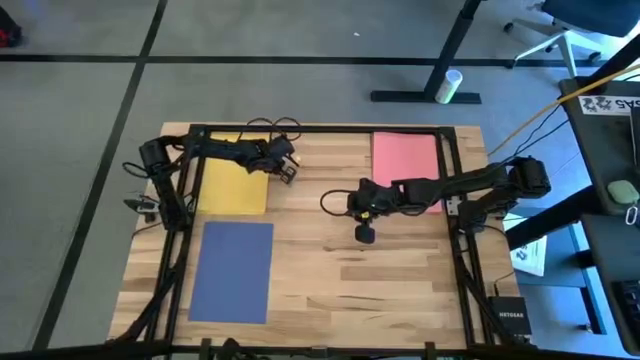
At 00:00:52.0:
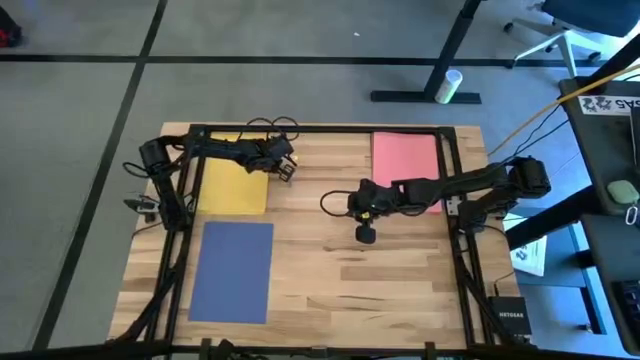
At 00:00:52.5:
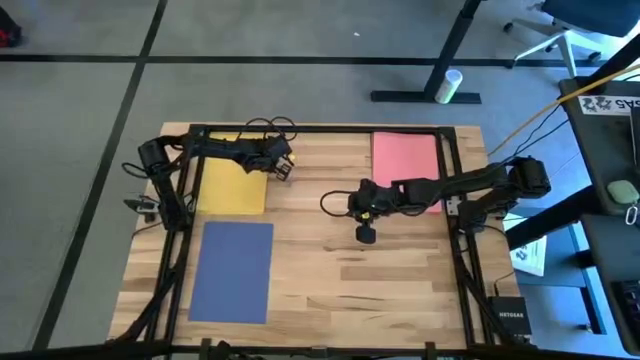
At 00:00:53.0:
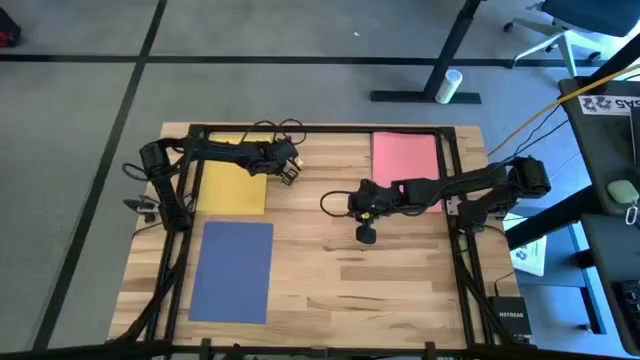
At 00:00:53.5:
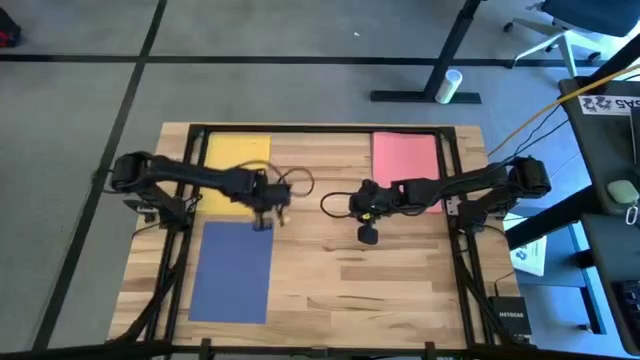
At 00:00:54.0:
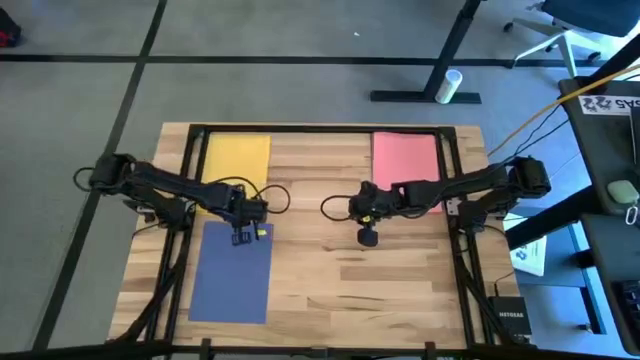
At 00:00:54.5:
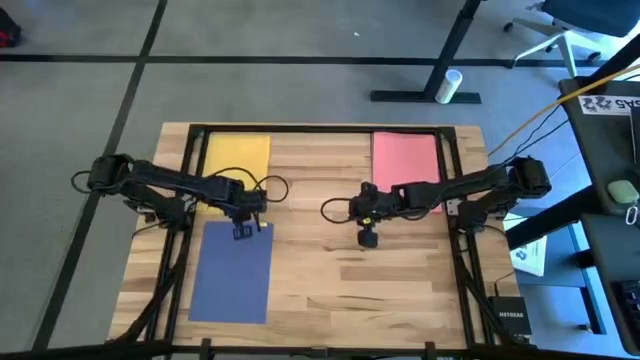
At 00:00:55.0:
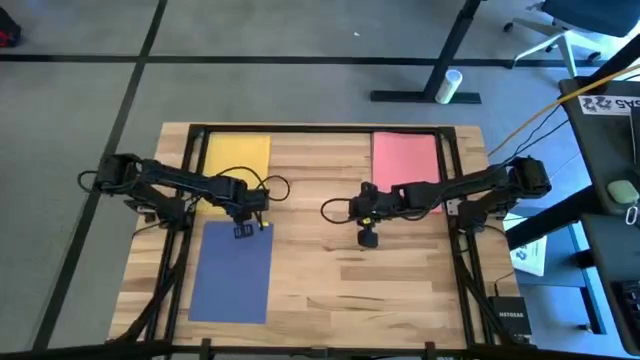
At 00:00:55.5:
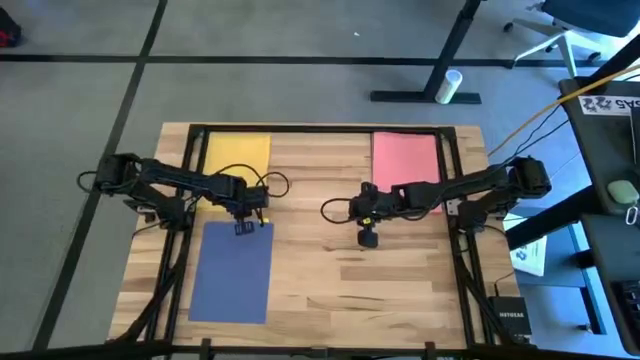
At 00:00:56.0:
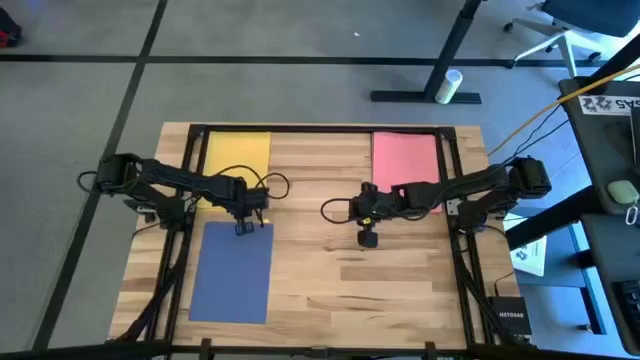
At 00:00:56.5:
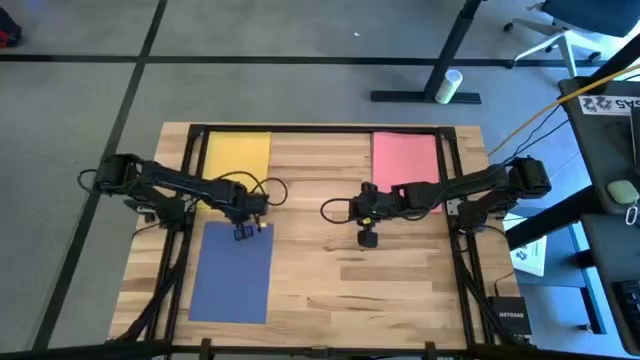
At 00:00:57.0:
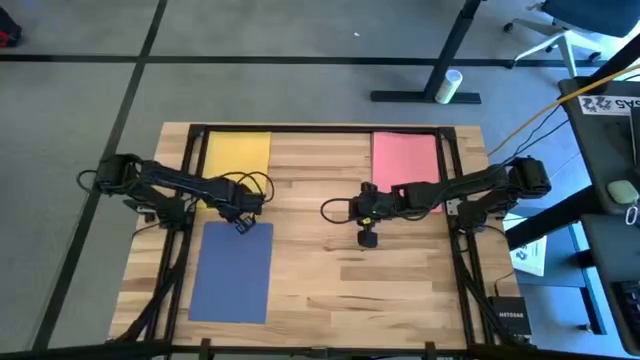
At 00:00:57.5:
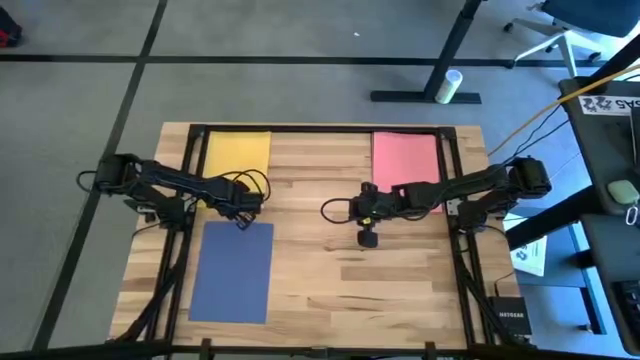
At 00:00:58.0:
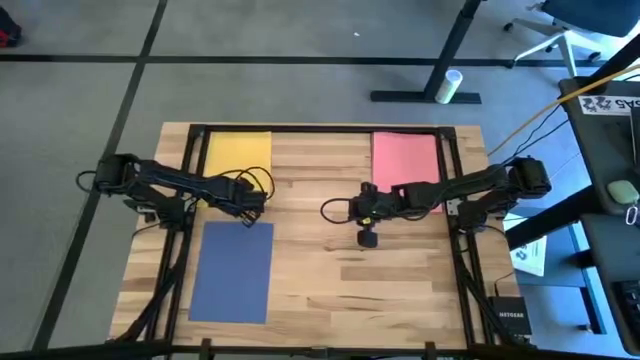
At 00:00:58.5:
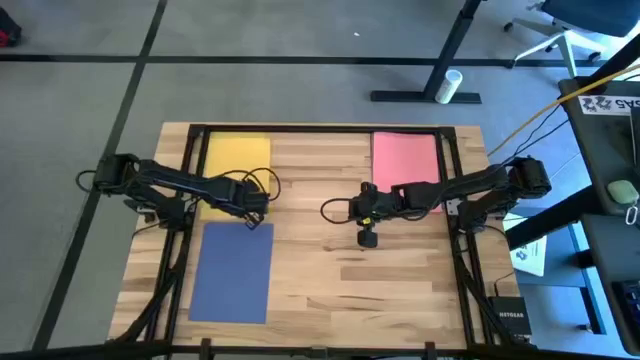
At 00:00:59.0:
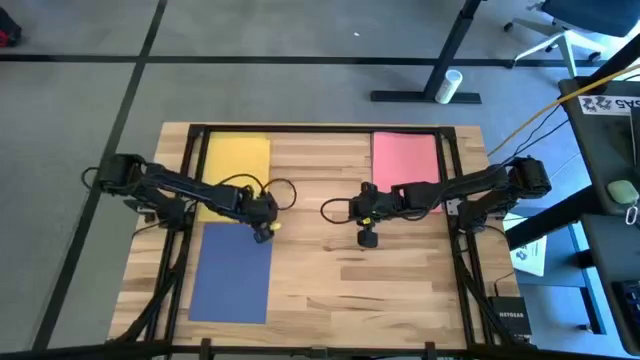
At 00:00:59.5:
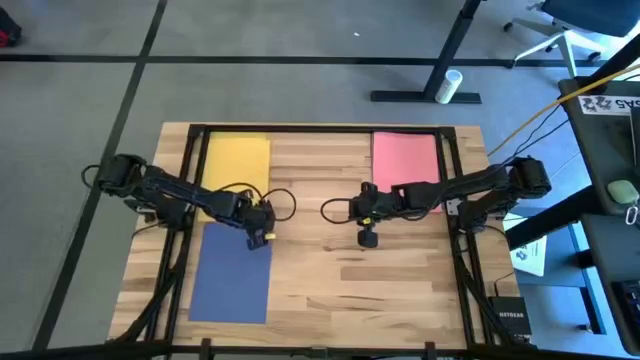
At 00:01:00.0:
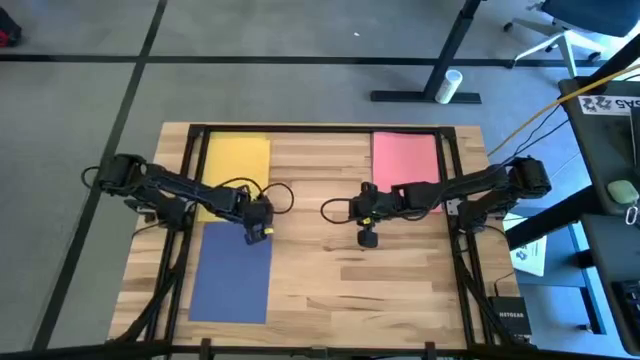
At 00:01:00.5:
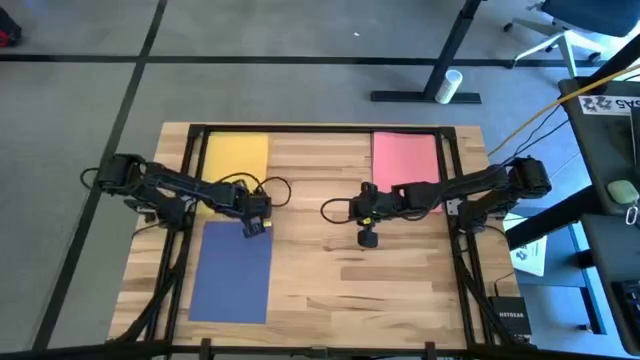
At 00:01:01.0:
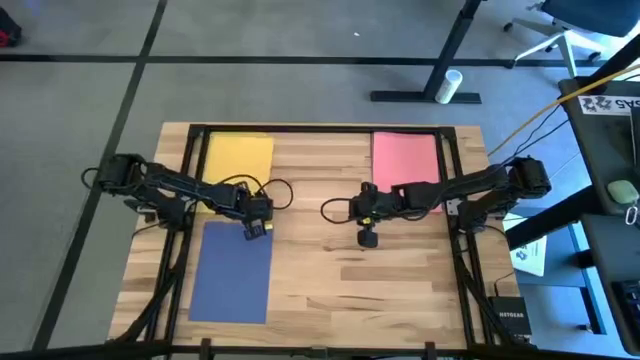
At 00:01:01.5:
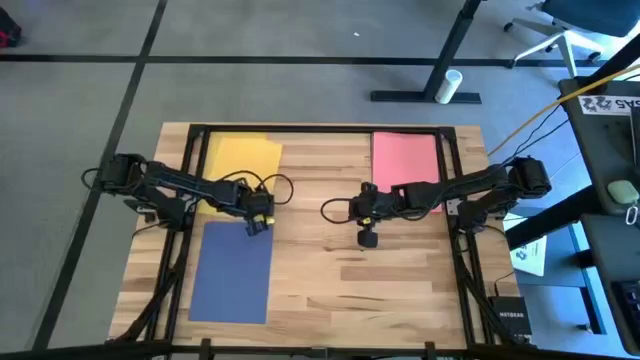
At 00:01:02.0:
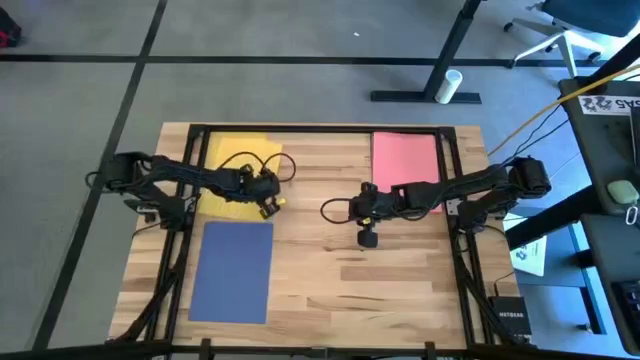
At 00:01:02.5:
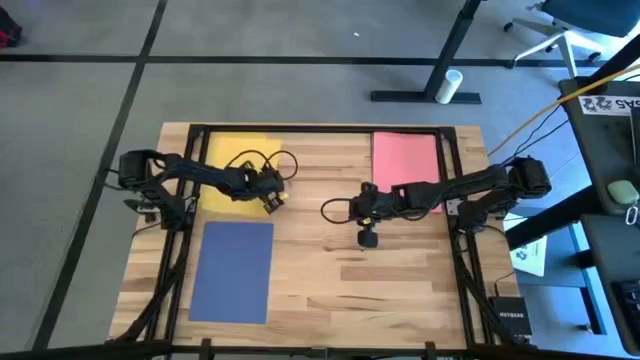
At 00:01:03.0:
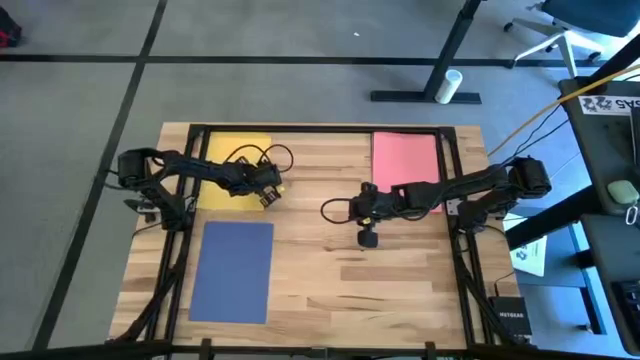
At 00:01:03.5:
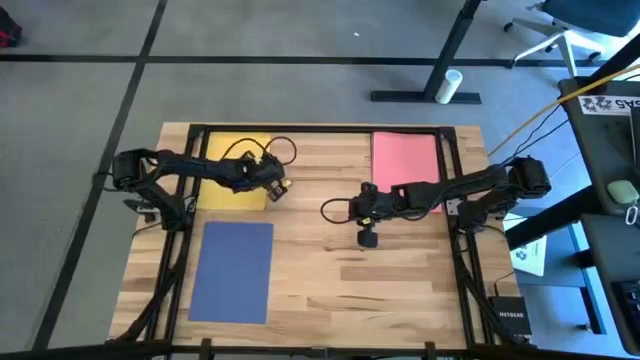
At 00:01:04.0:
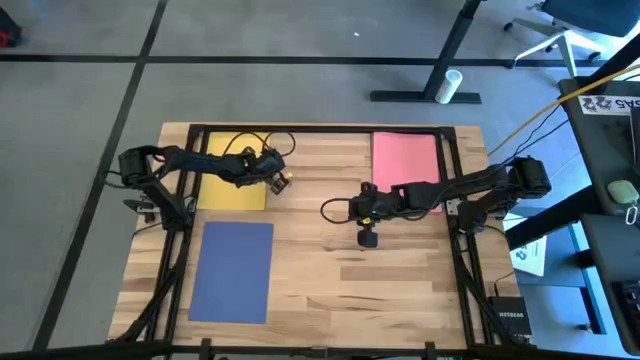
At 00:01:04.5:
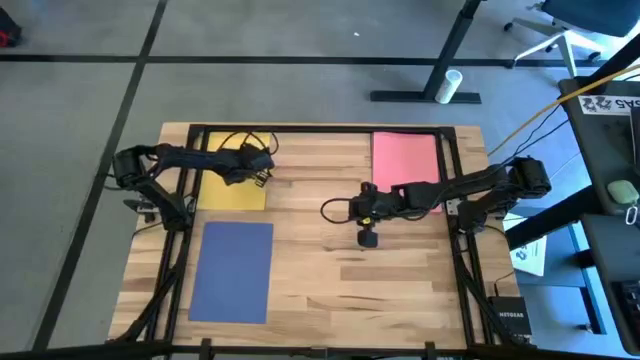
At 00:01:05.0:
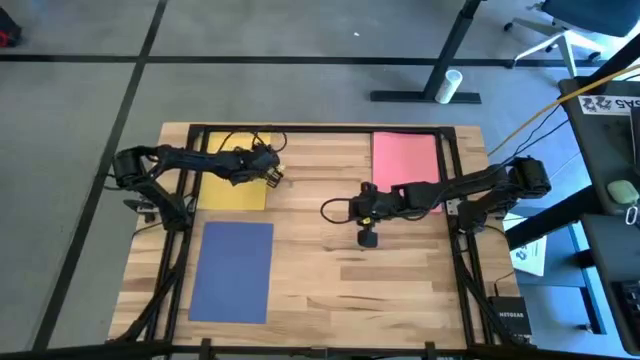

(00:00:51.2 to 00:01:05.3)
Task: Organize paper
Stack the yellow paper on top of the yellow paper
